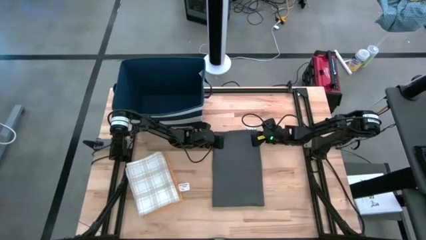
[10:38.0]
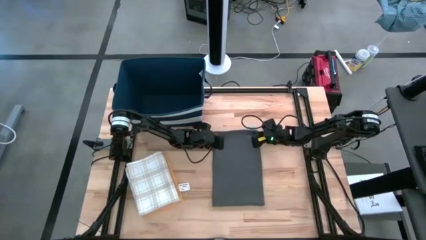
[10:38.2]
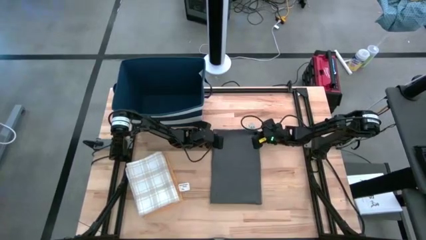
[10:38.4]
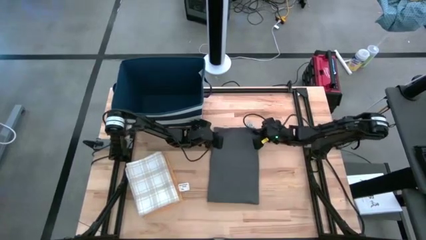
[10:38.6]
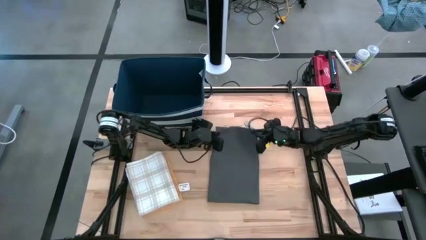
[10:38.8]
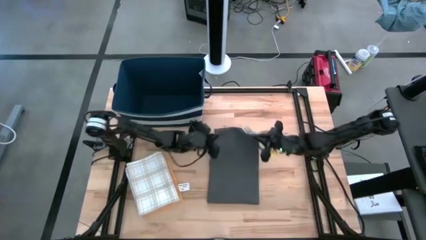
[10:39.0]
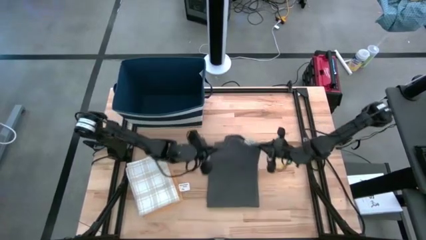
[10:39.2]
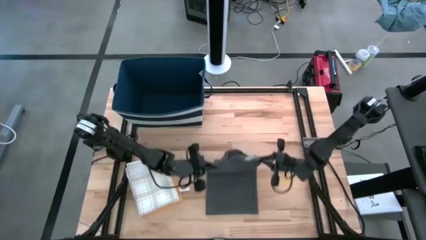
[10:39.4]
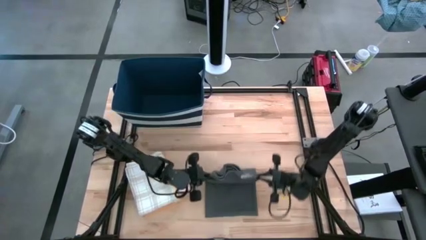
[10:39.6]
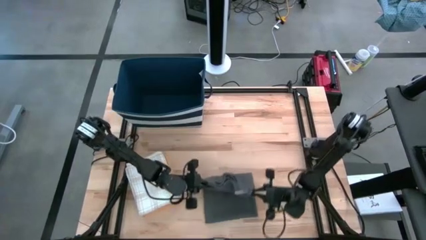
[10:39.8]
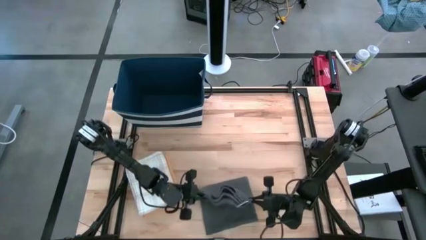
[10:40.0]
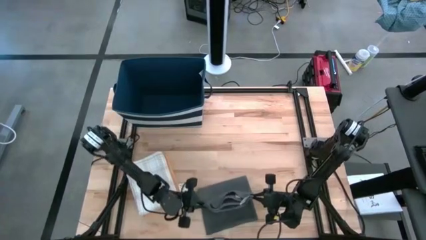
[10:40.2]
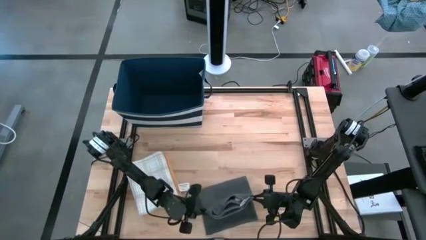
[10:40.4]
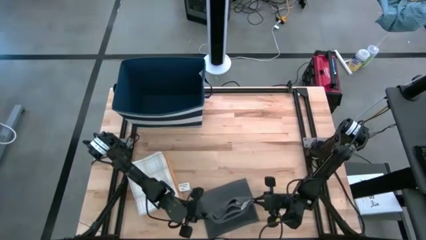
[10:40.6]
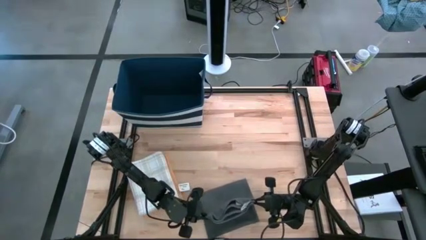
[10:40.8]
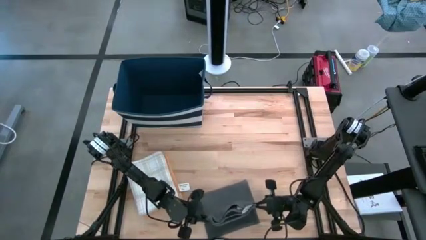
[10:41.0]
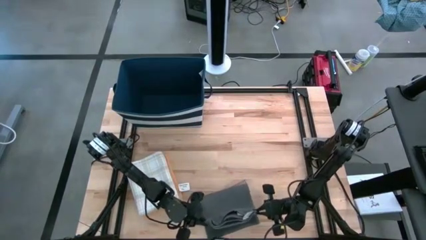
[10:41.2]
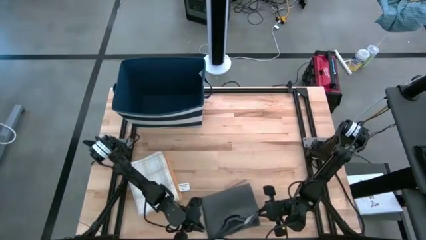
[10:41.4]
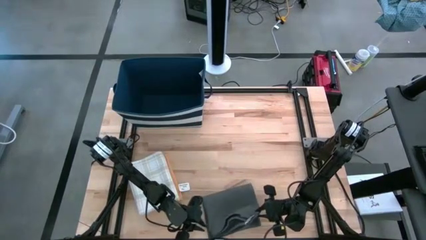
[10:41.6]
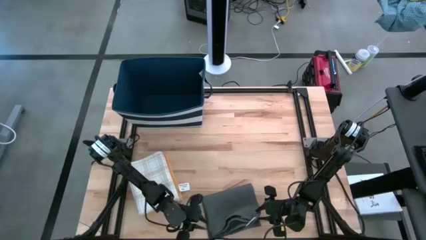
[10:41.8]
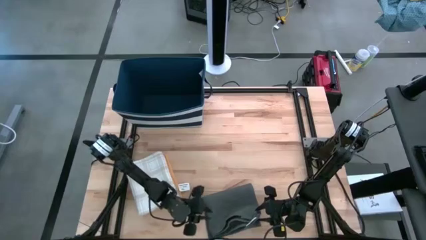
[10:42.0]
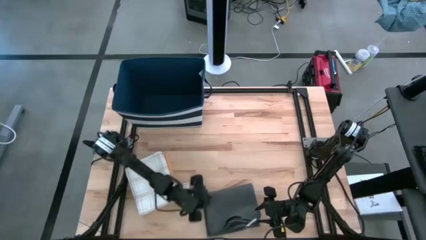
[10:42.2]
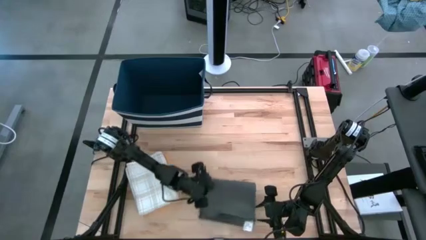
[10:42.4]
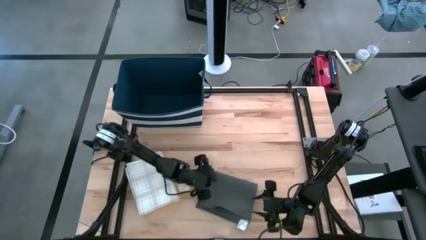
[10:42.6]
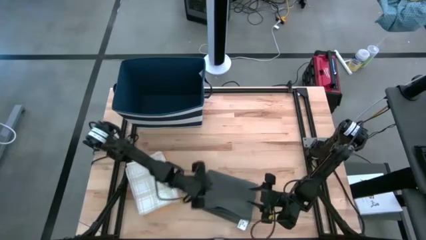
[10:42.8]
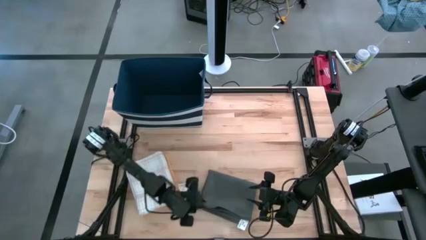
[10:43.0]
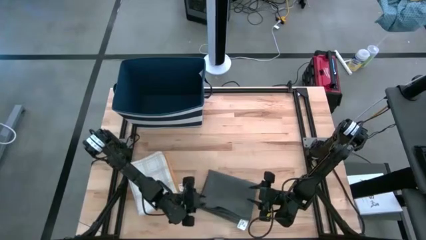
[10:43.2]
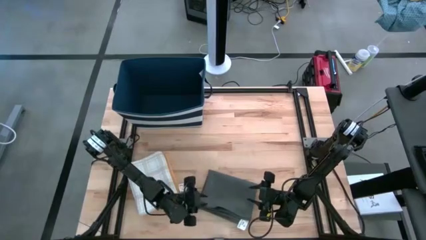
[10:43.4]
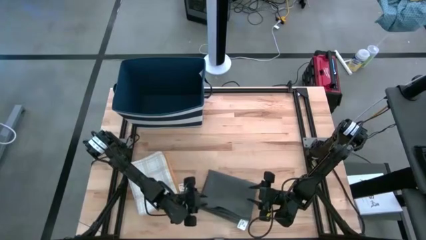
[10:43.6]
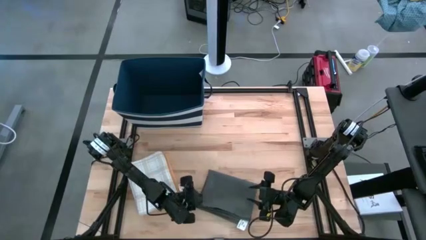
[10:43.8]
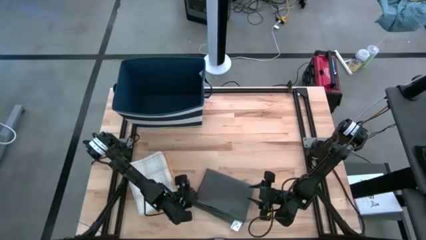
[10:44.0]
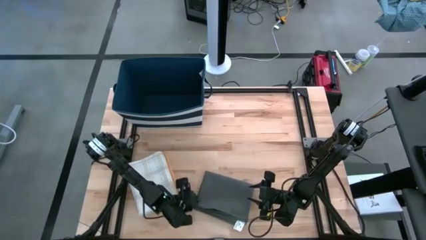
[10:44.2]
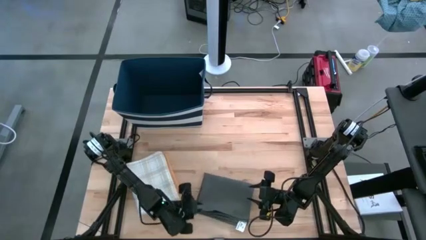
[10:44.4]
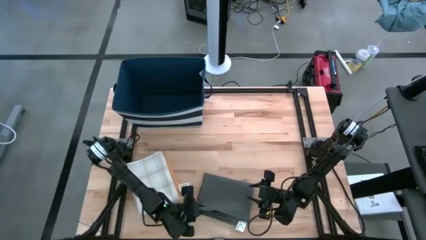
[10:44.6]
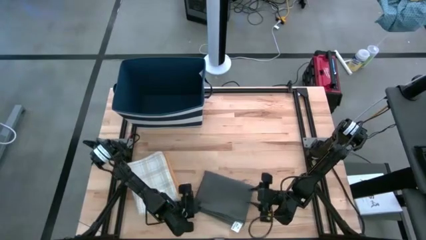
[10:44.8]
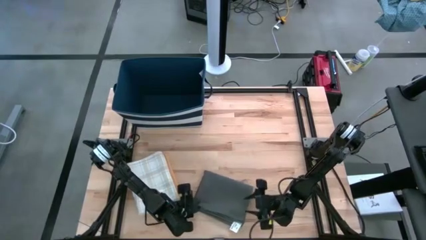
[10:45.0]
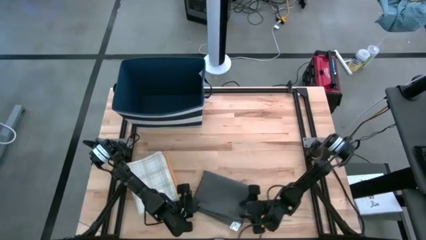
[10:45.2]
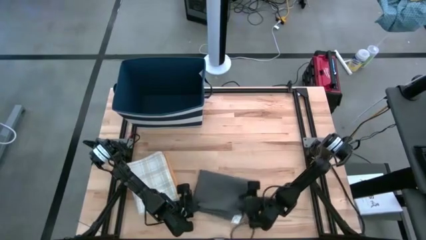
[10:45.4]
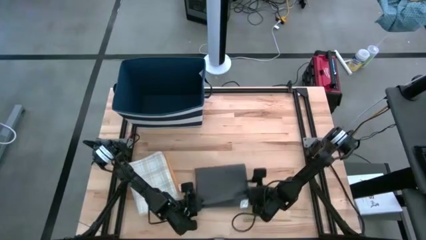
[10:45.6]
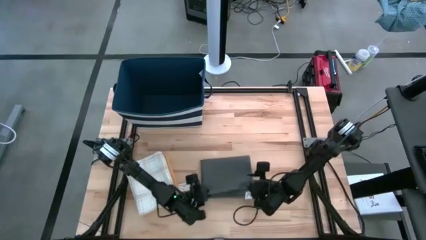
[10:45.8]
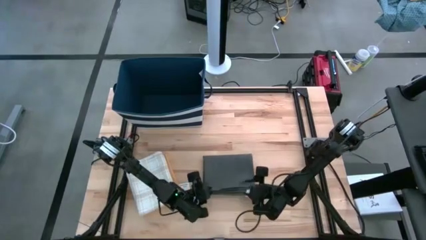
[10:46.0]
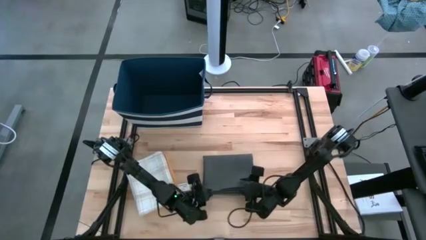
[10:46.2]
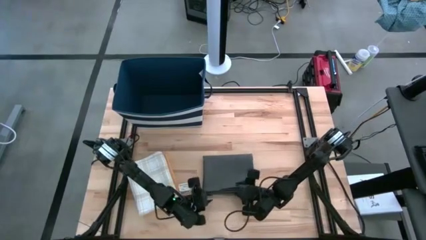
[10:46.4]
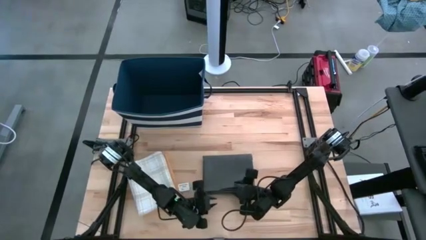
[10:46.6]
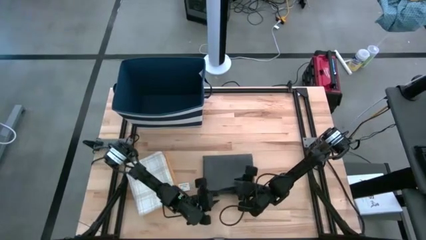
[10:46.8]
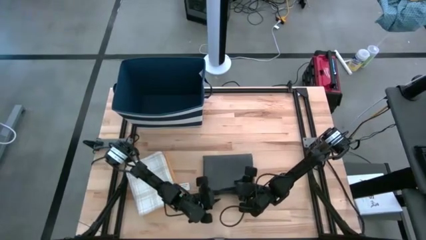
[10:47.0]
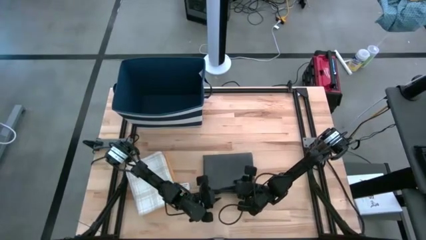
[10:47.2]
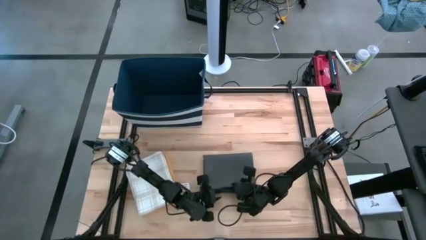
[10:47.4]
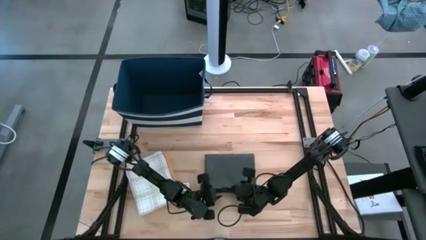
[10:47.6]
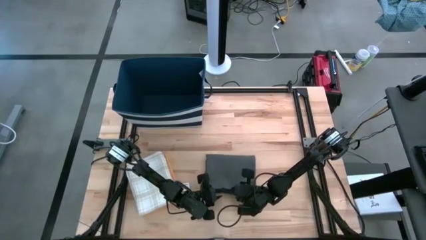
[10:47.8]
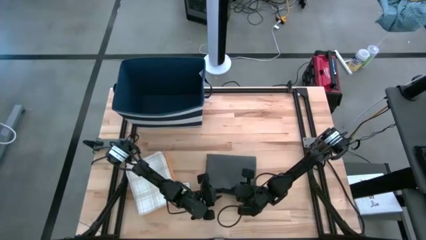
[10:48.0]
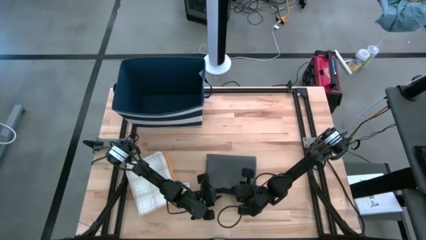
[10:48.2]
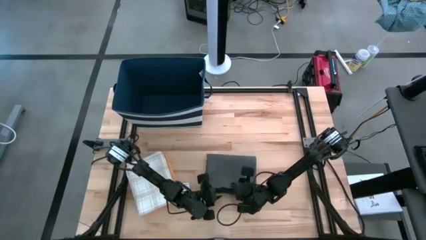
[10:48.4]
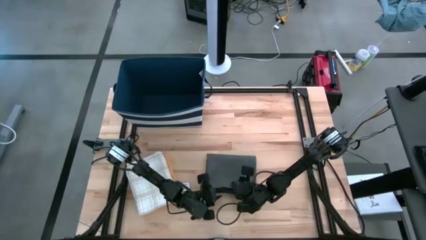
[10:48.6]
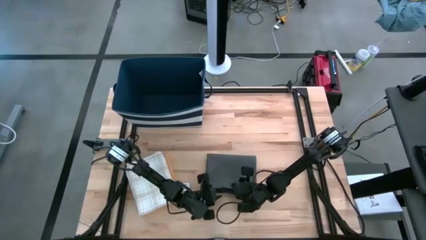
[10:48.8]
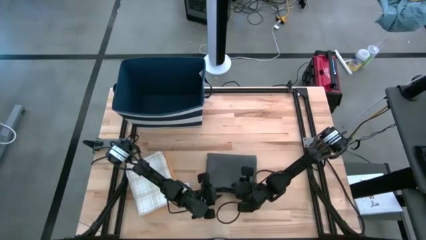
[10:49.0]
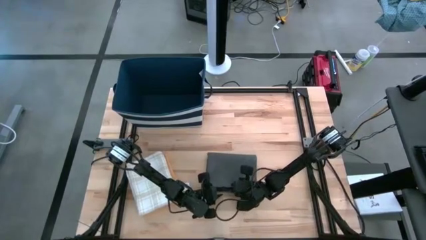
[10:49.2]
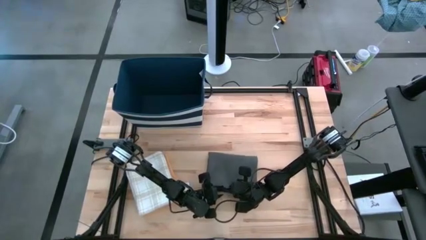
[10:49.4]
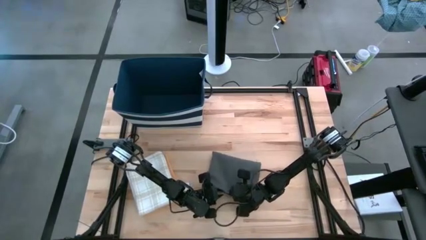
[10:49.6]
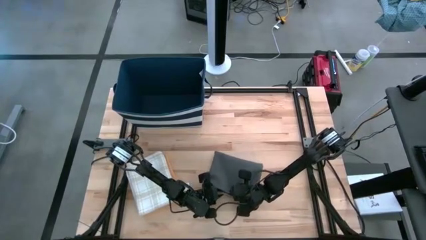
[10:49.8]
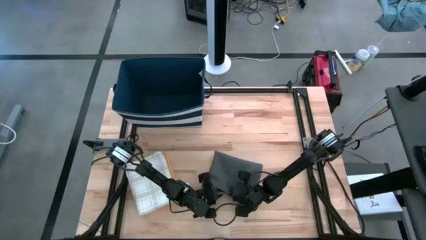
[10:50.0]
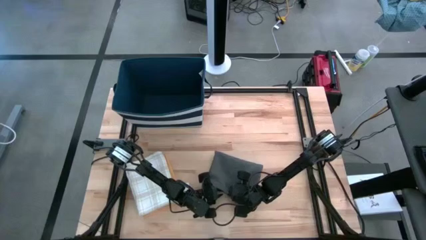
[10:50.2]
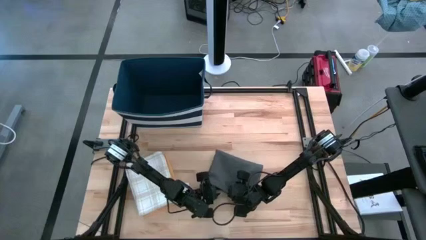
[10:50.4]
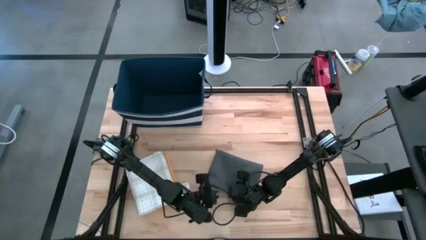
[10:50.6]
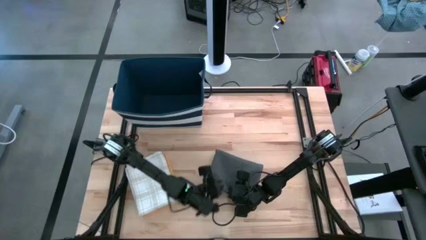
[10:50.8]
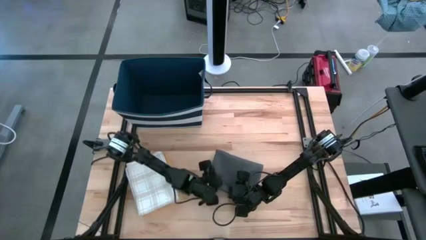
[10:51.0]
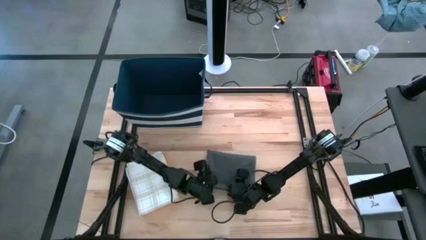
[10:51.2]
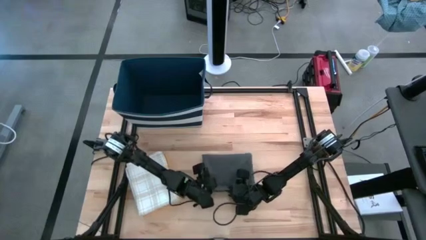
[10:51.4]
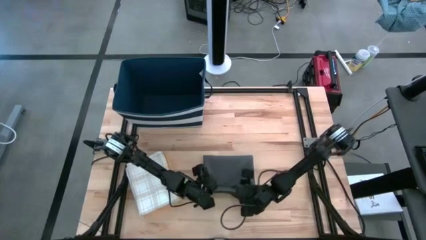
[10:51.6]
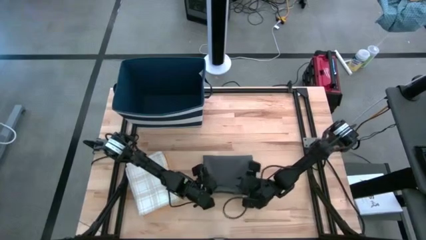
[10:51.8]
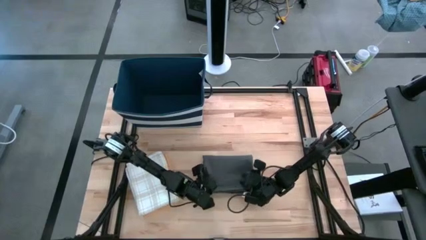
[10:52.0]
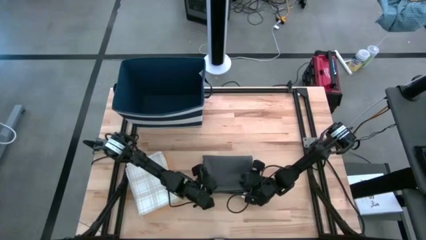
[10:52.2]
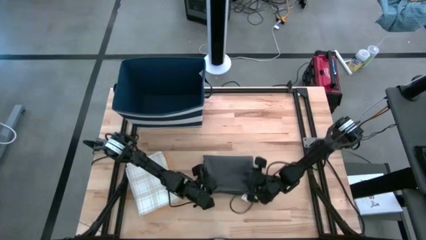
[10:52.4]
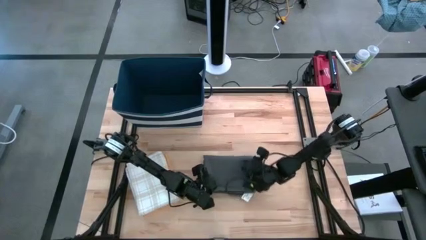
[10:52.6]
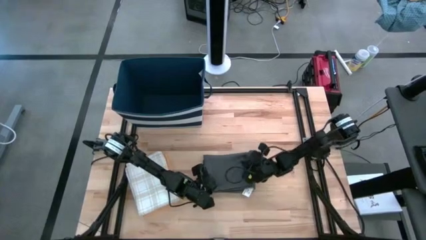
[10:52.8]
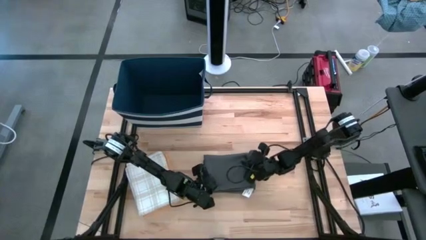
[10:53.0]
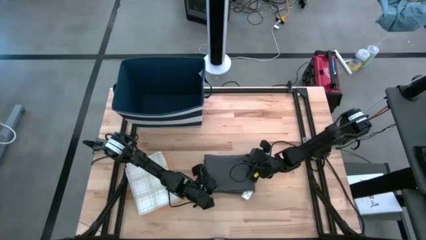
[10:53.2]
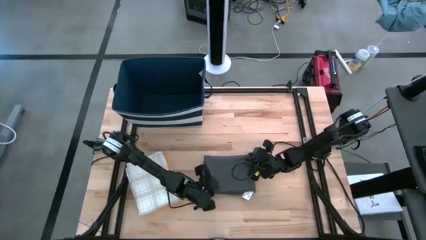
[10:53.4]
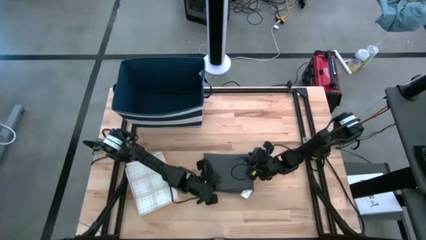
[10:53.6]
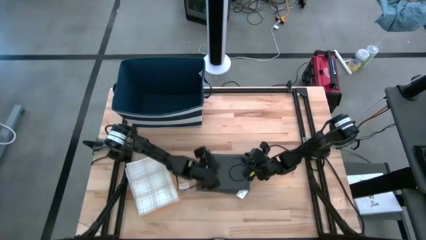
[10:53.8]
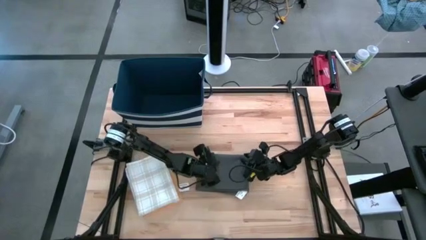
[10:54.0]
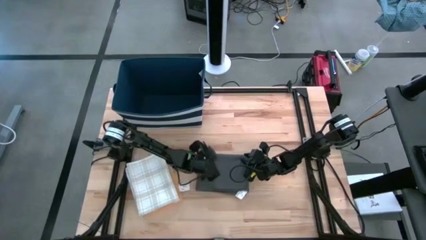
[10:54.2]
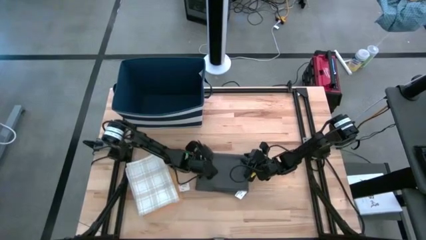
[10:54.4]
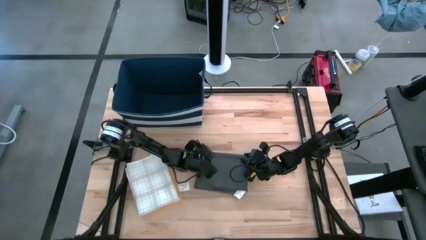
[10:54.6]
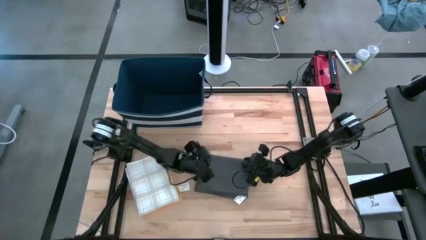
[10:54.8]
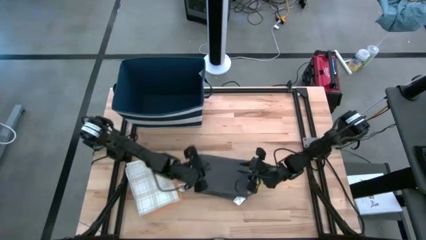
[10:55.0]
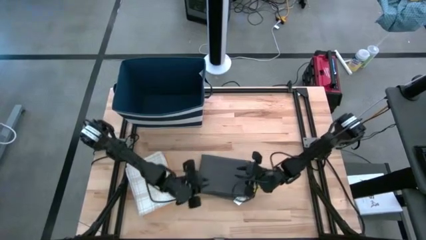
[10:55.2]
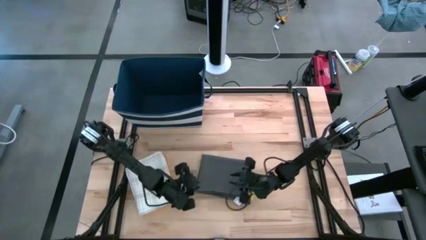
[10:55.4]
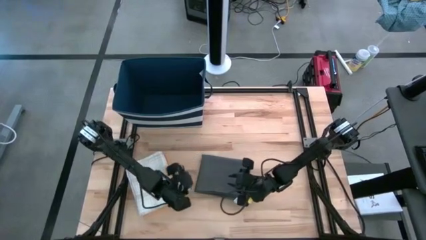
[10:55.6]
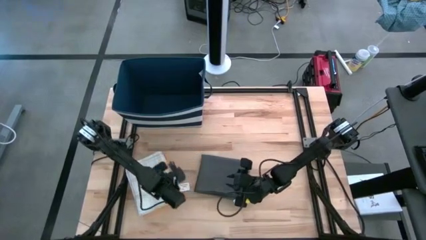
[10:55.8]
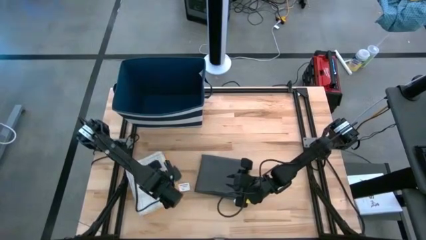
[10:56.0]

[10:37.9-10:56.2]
Task: Fold towel
Fold the gray kitchen towel
